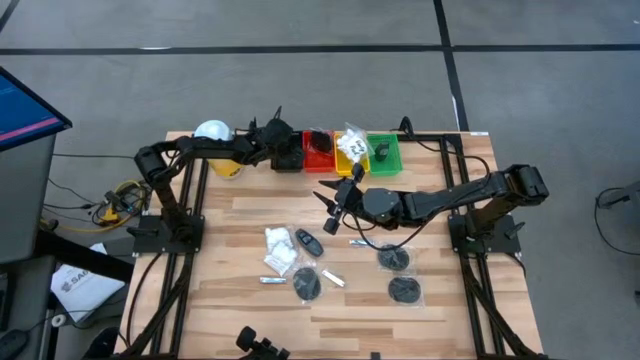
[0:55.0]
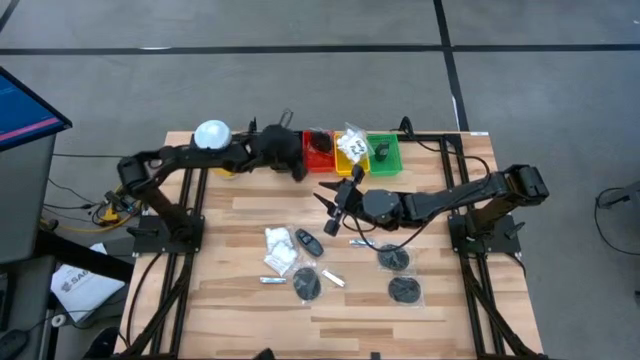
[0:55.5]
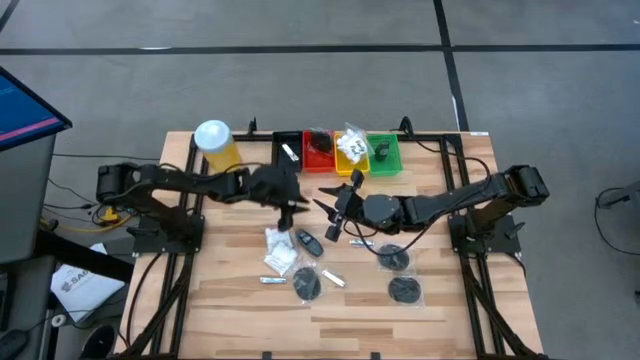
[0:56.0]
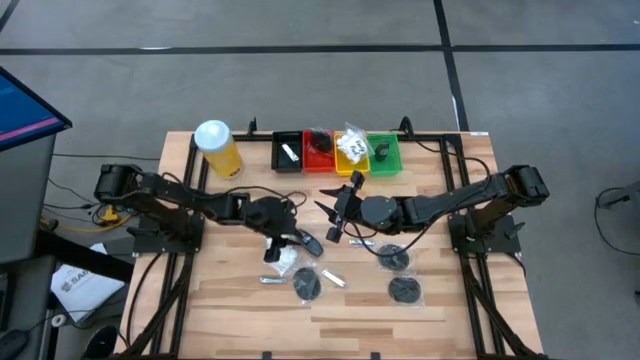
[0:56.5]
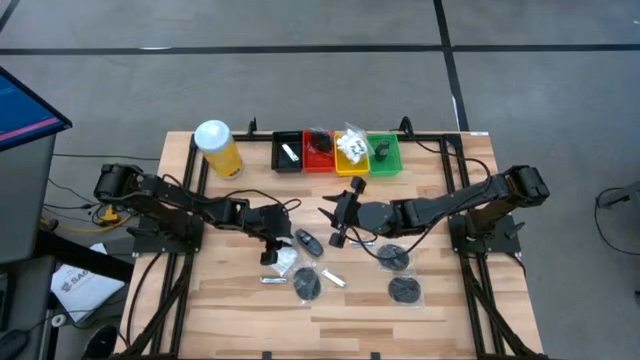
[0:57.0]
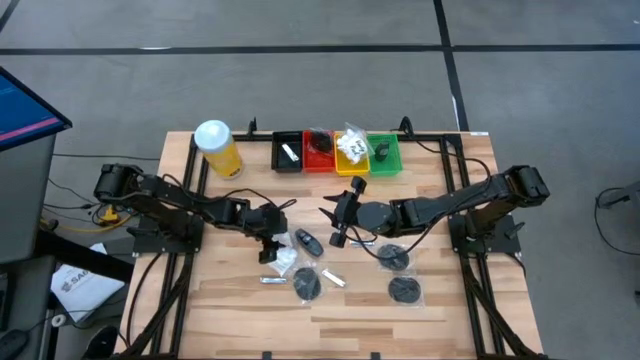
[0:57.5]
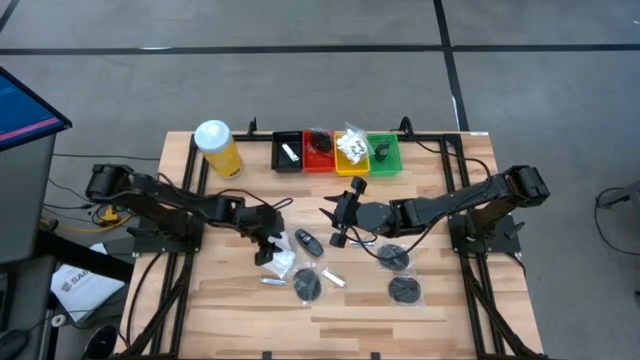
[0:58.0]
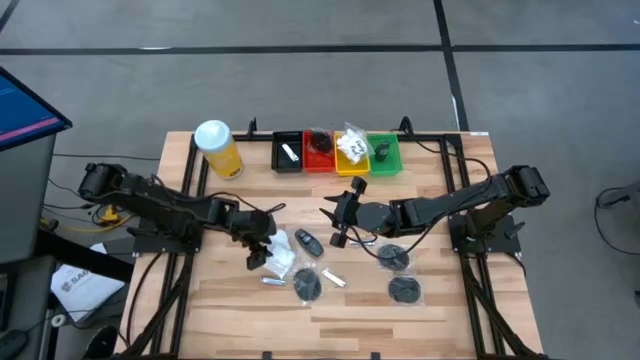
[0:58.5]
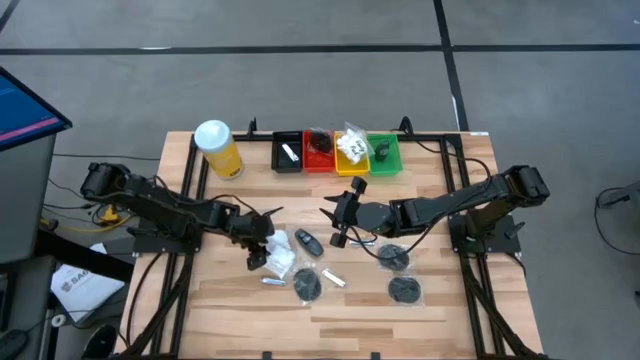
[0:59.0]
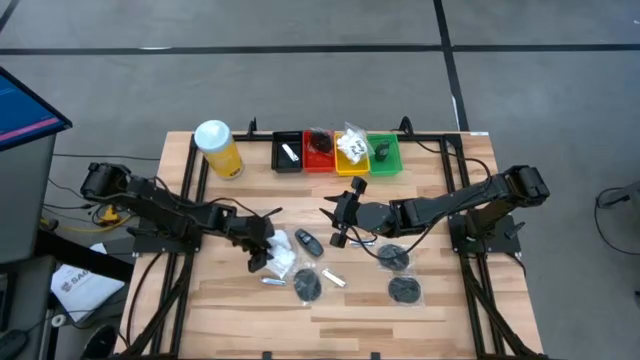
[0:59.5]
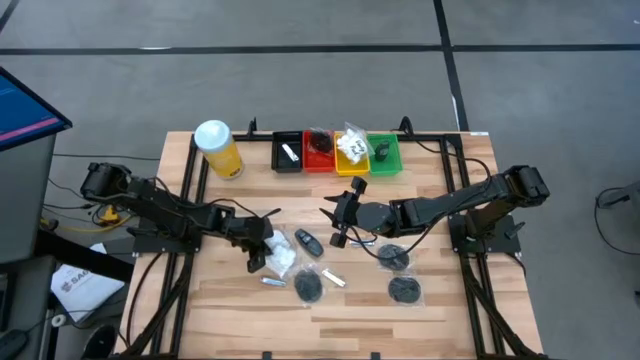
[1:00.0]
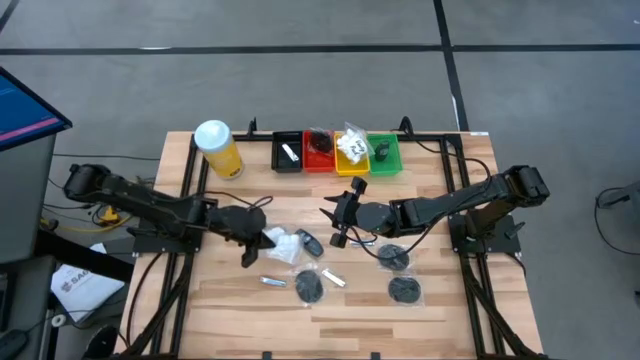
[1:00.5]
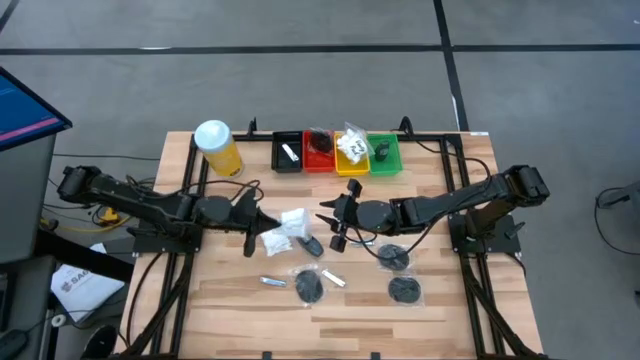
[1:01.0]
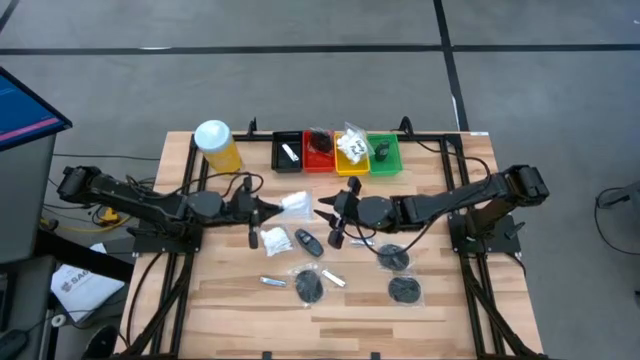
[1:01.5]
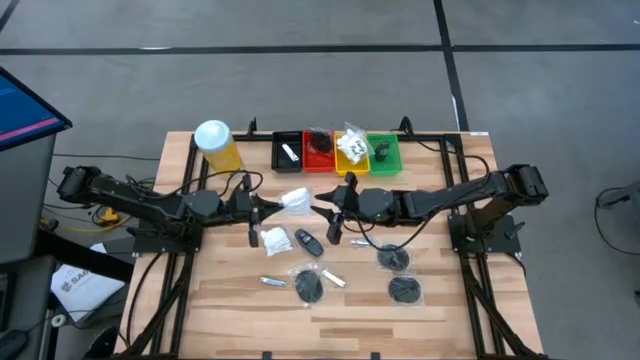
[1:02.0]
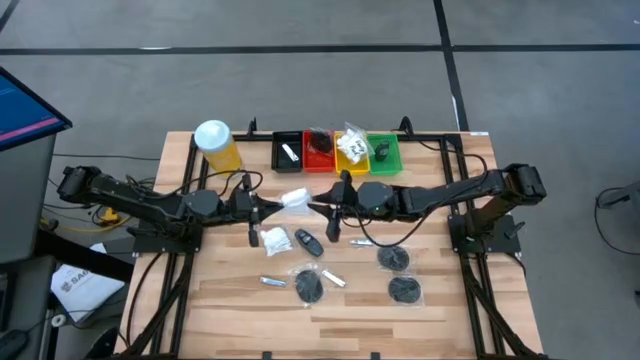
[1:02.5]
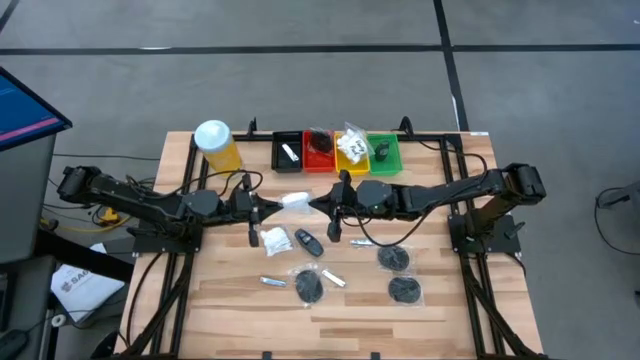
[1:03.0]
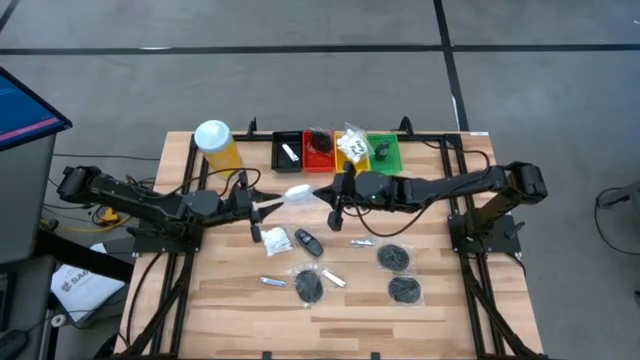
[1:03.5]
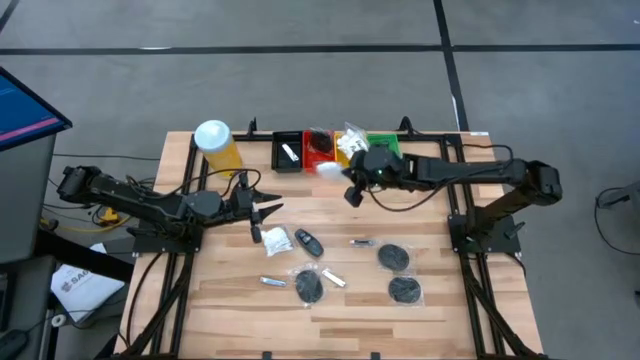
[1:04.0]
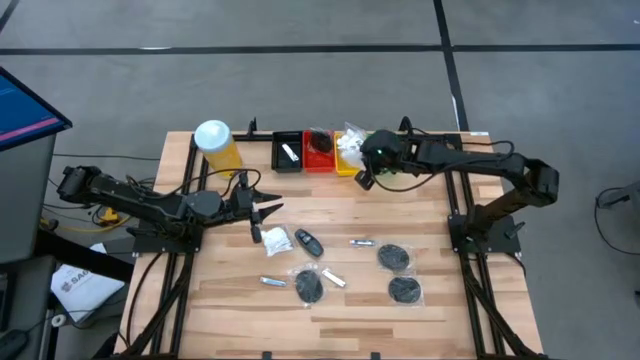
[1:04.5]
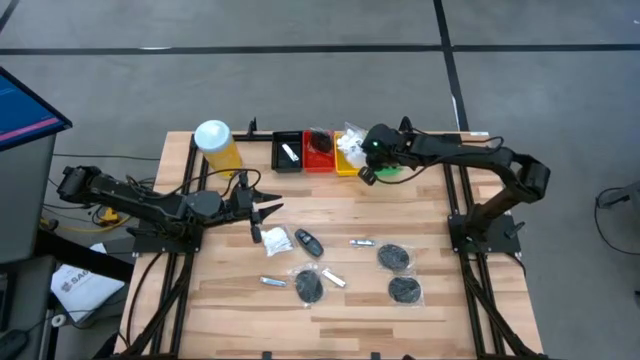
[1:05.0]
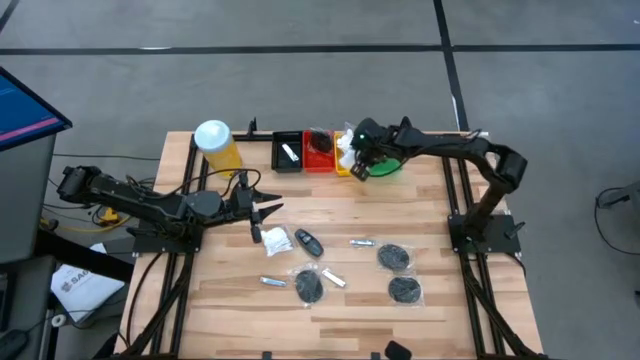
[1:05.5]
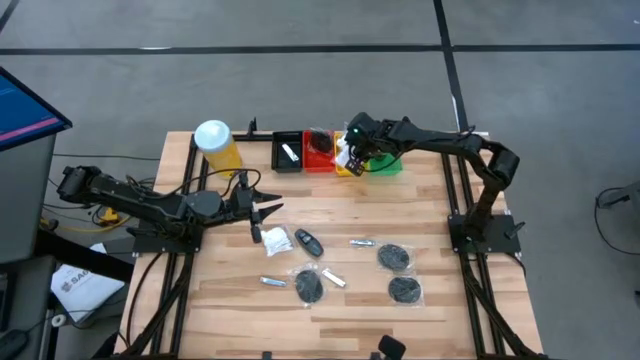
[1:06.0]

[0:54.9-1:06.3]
Task: Pick & Place Travel size toiletries
Put the cotton pack into the yellow bin

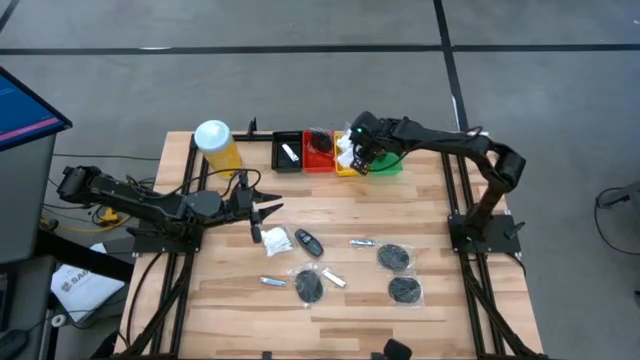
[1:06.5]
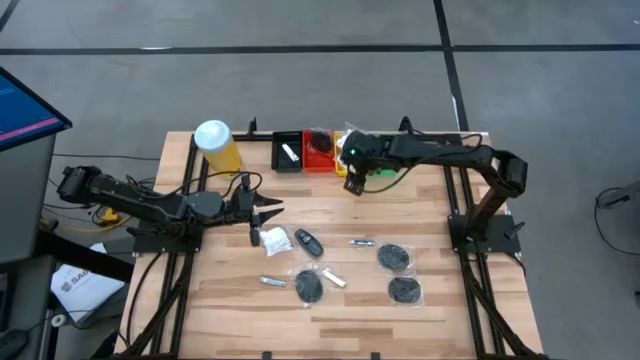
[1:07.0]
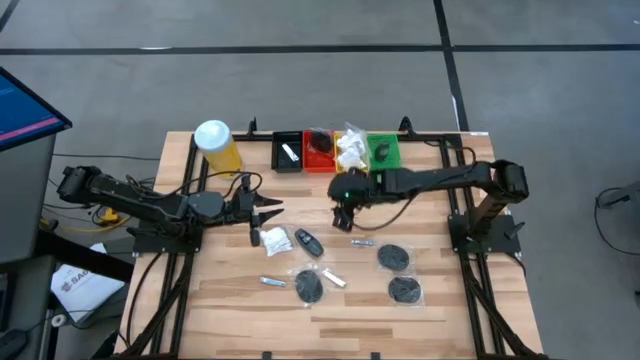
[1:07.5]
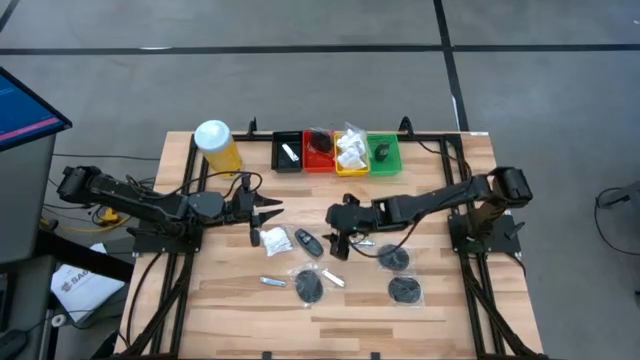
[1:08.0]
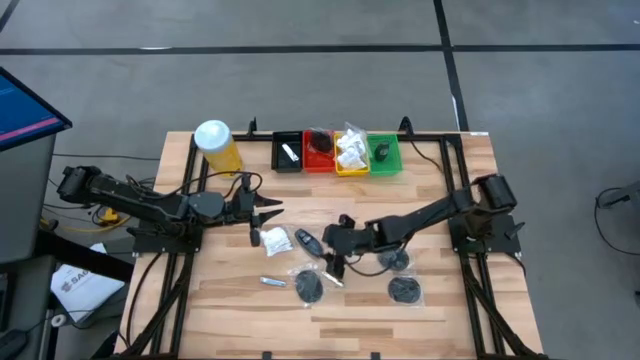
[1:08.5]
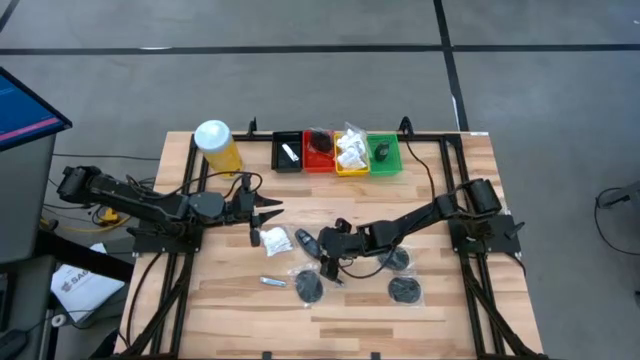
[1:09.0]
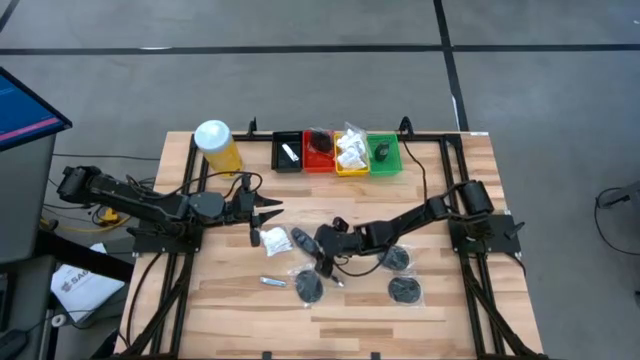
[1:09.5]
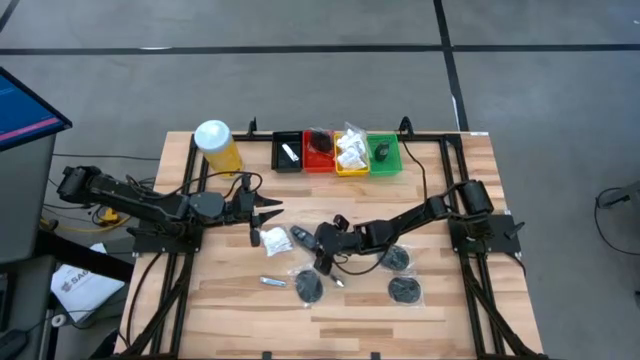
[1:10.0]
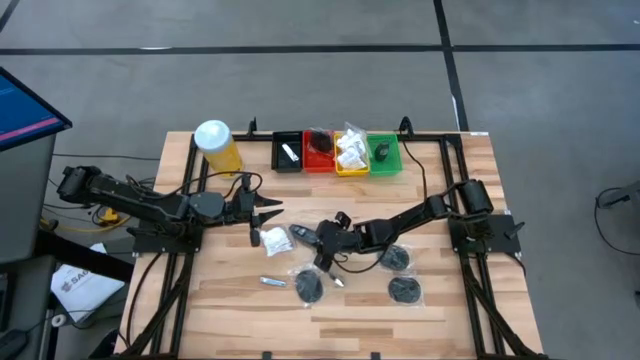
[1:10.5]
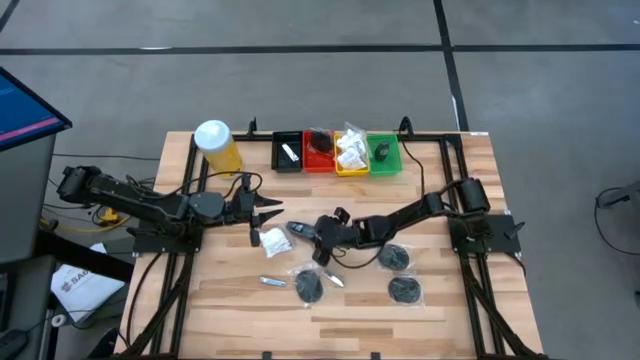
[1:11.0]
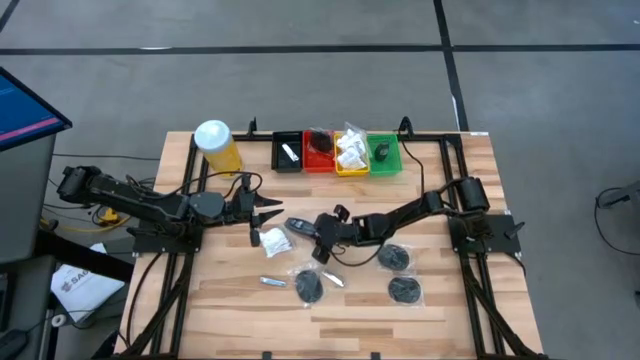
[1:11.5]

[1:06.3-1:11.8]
Put the deodorant into the green bin
